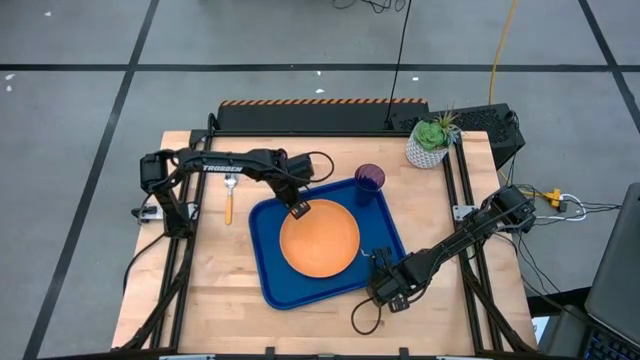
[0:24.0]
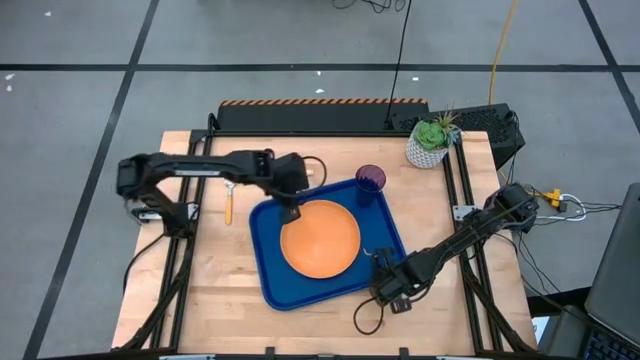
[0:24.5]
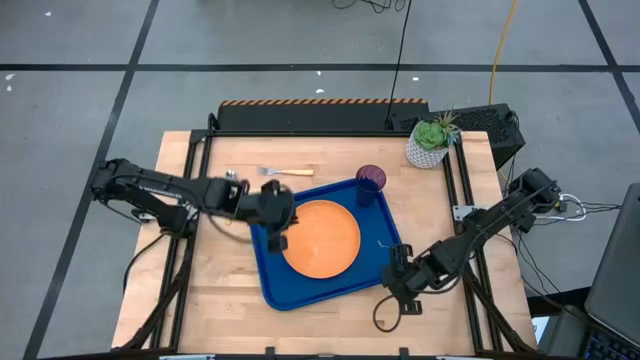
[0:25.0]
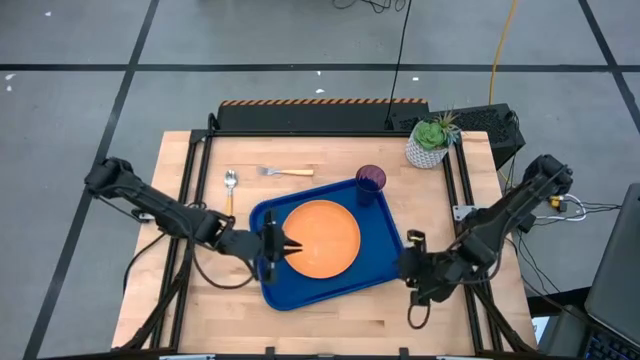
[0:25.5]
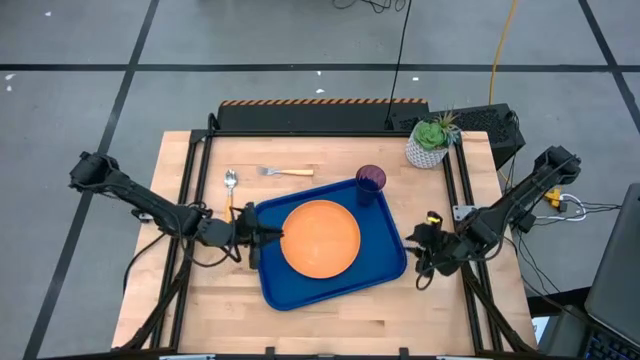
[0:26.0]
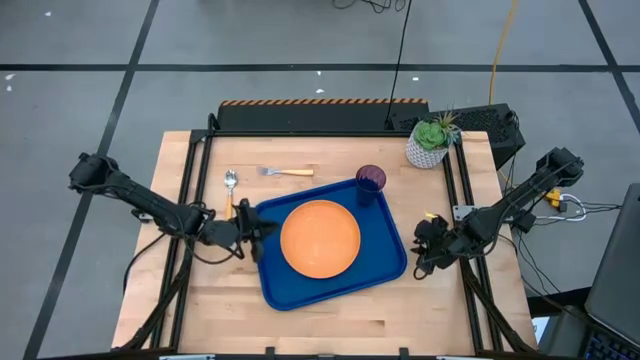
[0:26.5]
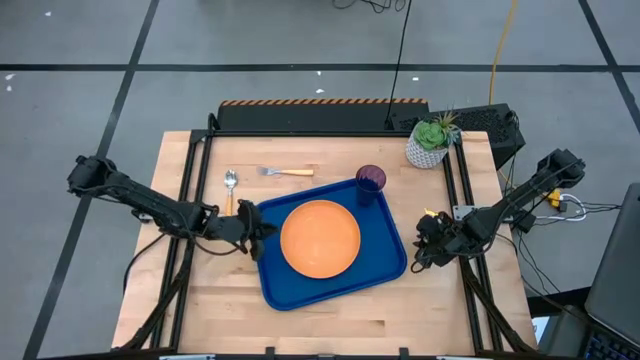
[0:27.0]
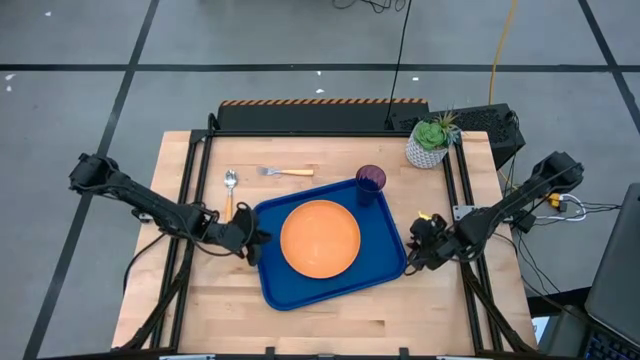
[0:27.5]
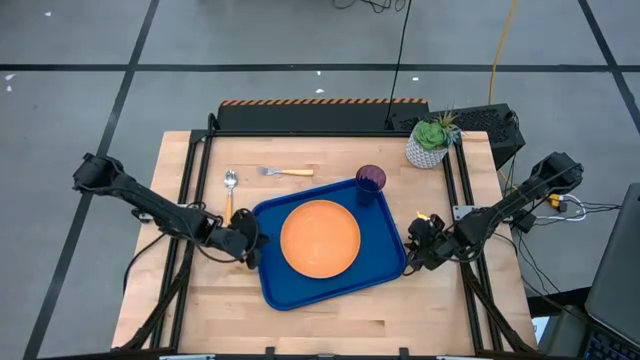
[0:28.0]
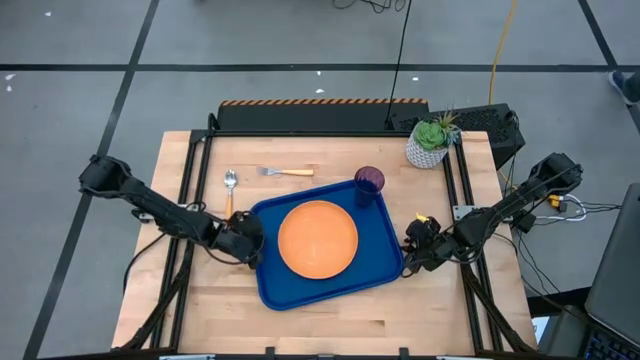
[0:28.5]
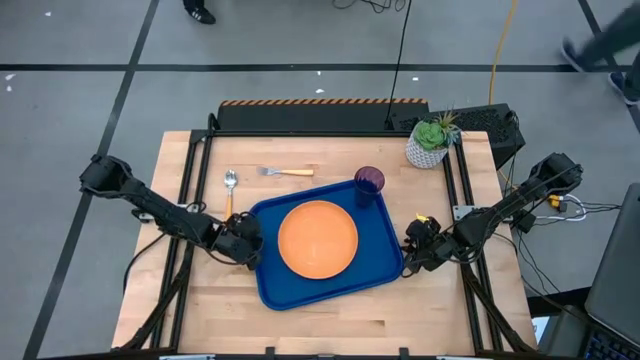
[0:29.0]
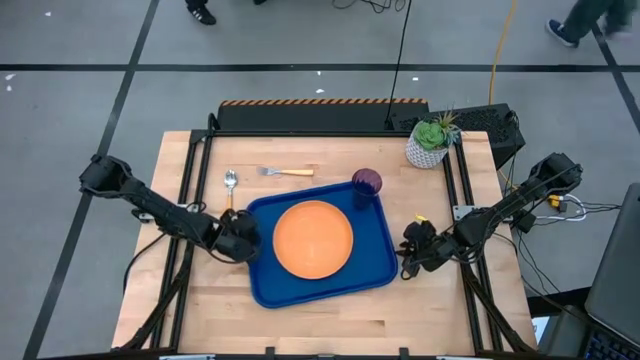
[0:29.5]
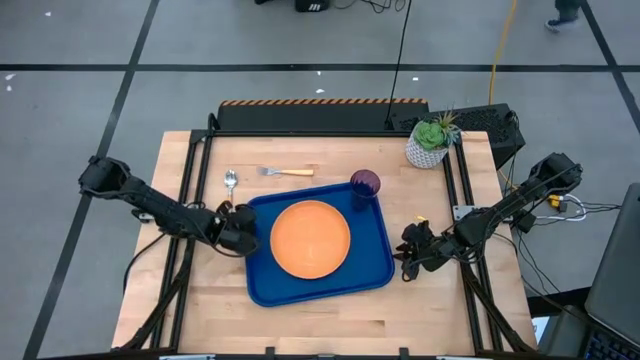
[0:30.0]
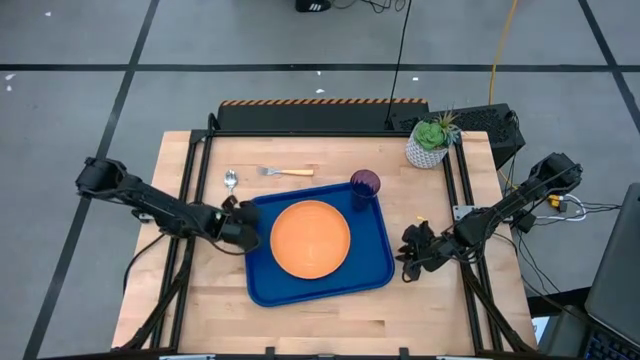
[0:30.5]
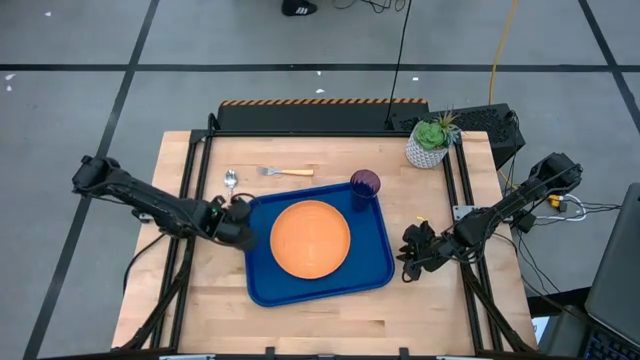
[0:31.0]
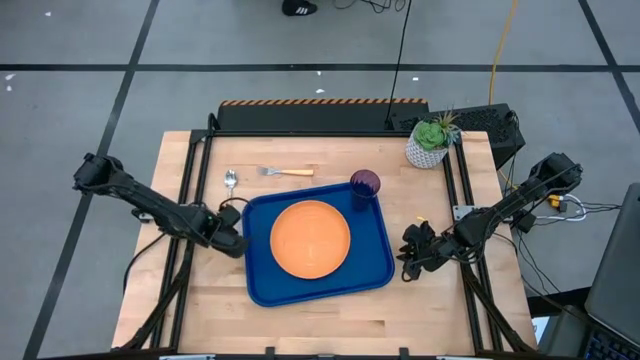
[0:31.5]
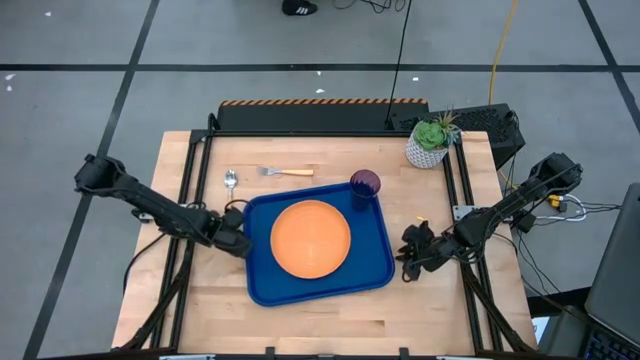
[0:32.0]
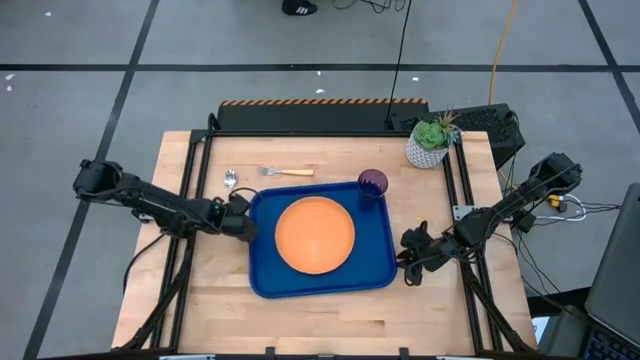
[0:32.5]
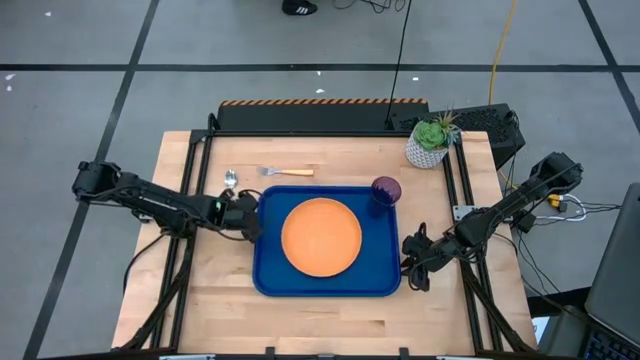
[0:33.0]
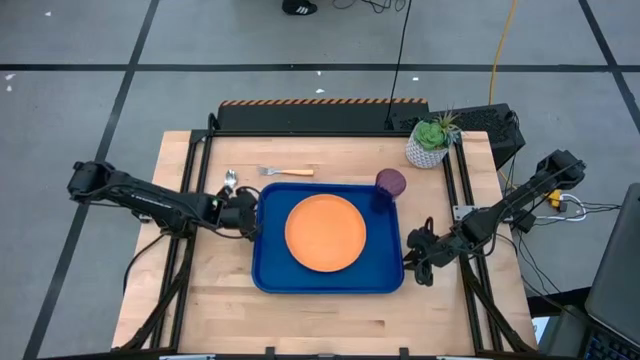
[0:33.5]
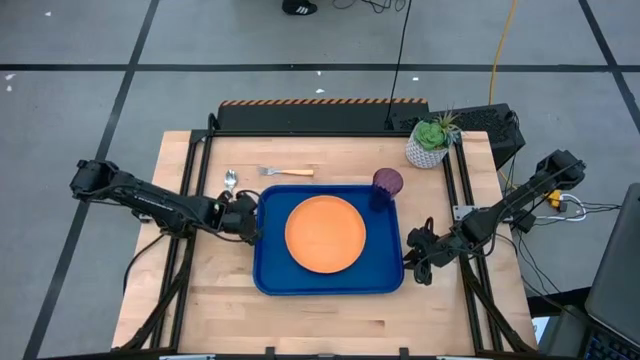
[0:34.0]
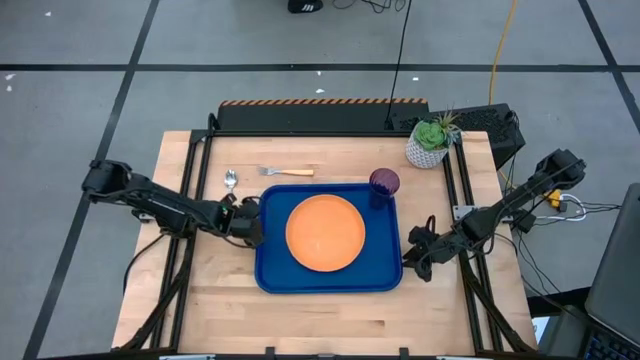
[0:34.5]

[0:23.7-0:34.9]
Task: Pick and place plate/cup/fork/spoon on tray
Adjust the blue tray

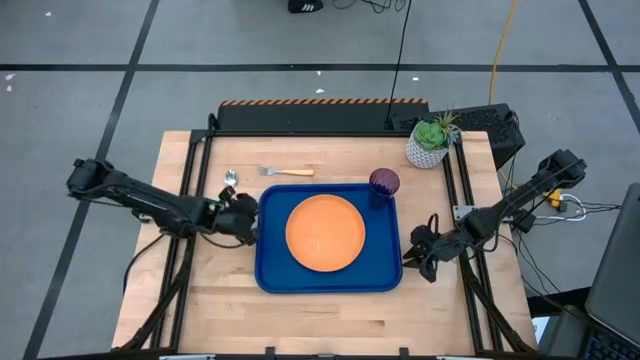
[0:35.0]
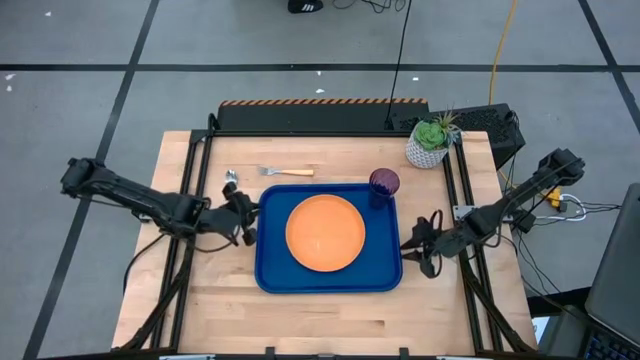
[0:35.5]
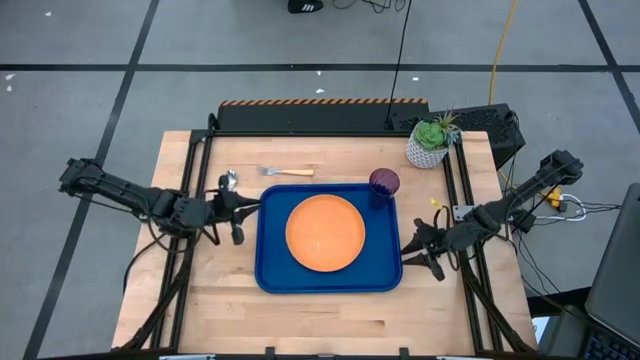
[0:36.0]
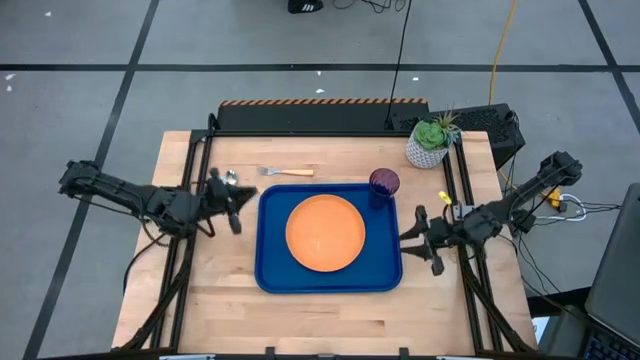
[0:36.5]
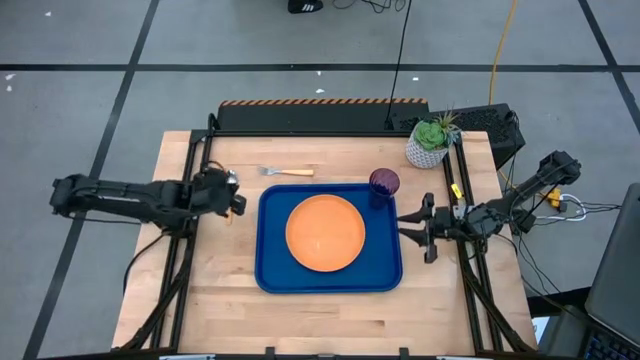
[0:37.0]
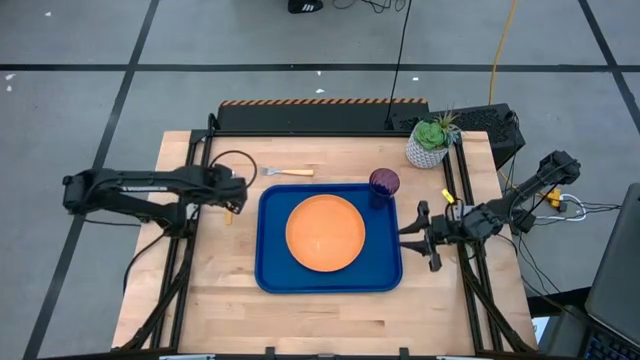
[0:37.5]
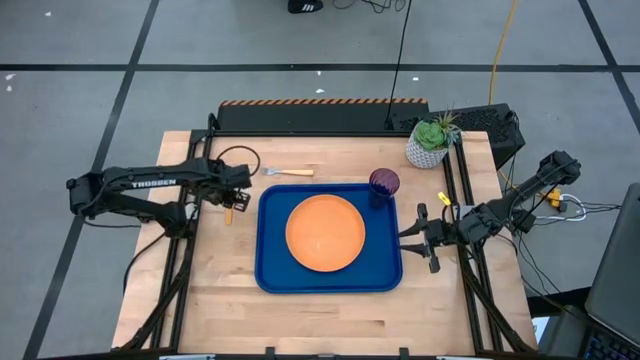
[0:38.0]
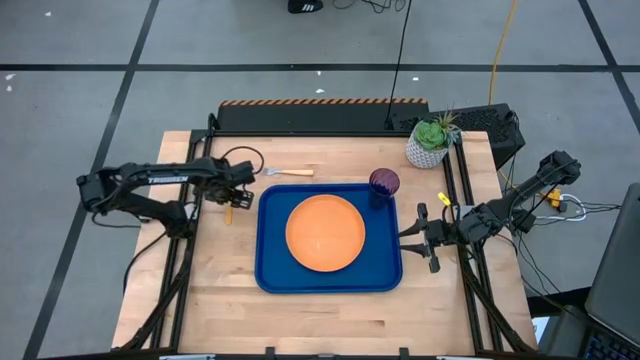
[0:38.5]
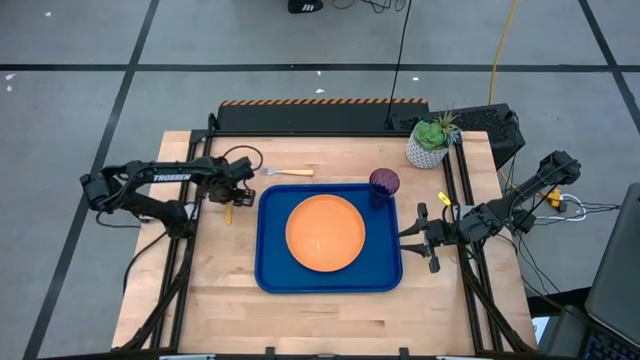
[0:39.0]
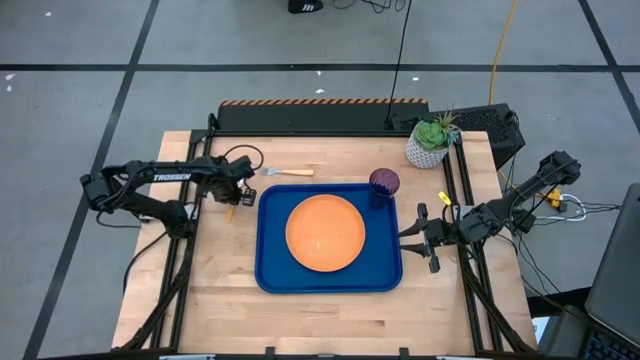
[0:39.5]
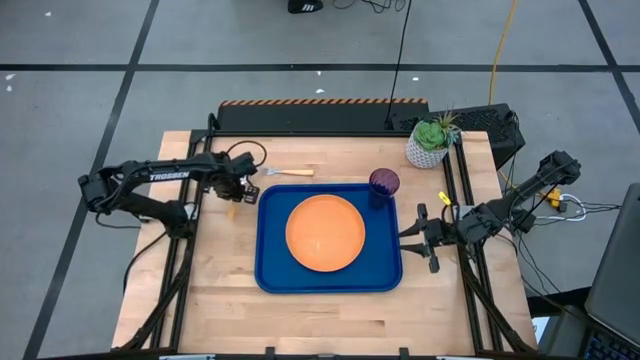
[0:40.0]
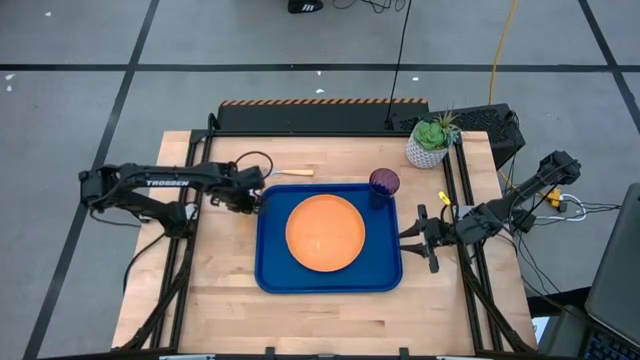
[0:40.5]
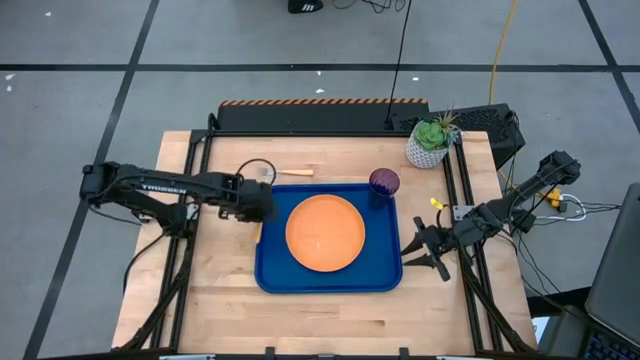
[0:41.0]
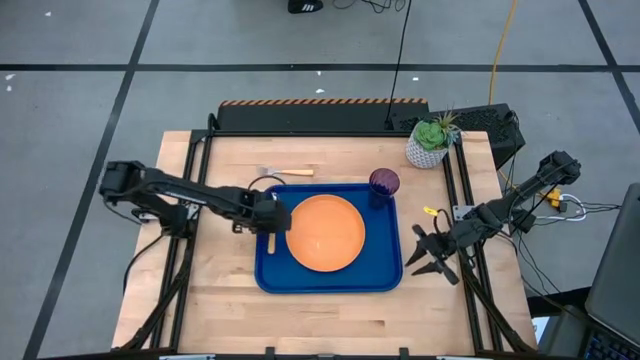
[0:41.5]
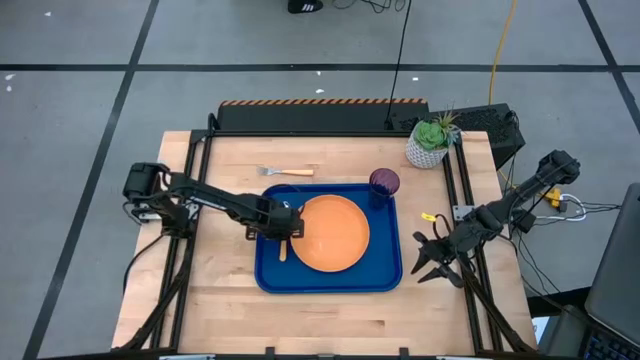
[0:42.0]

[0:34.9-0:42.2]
Put the orange spoon to the left of the orange plate on the blue tray

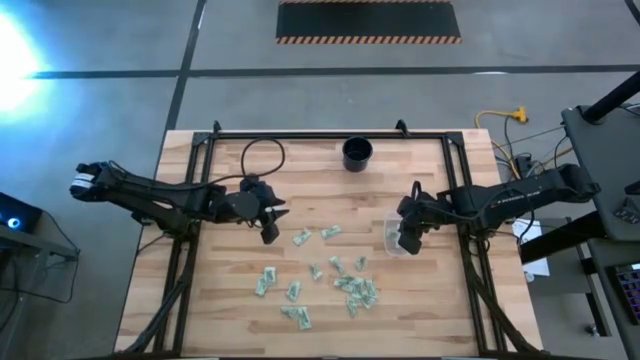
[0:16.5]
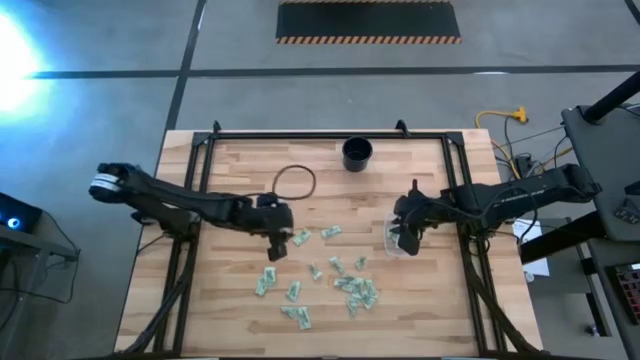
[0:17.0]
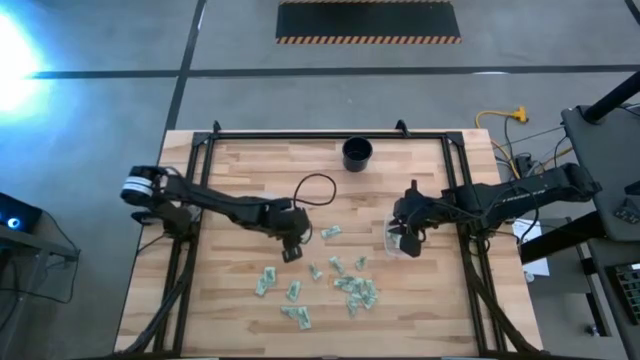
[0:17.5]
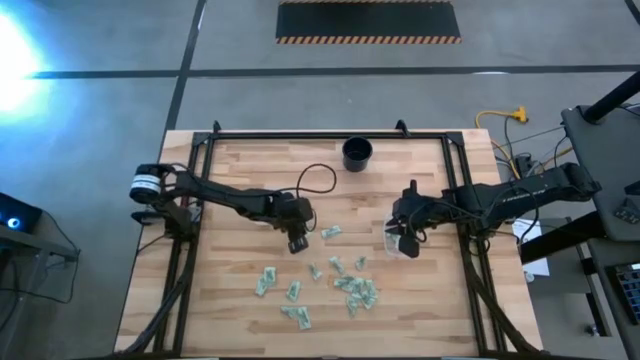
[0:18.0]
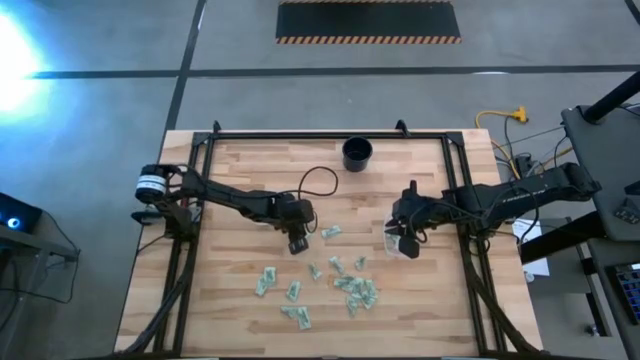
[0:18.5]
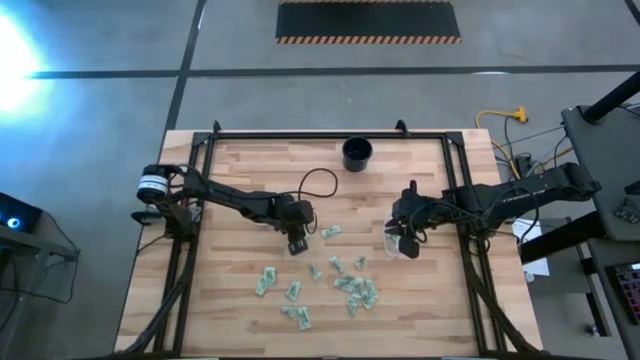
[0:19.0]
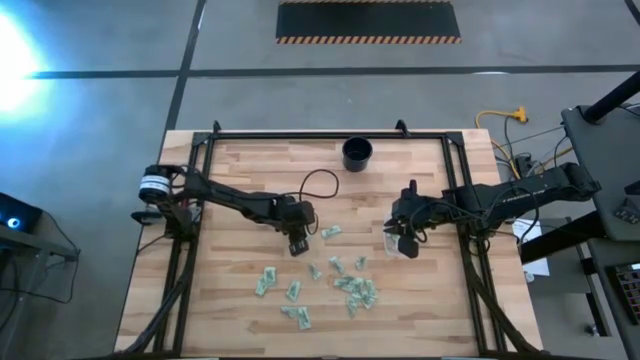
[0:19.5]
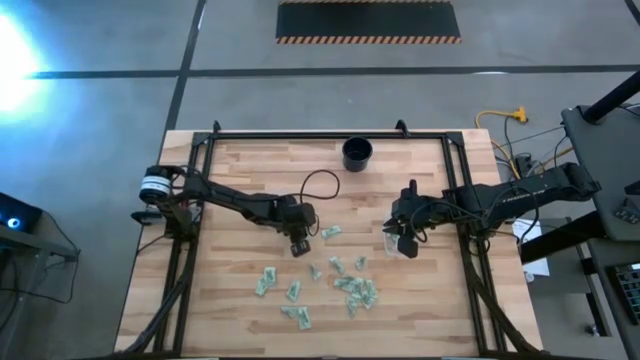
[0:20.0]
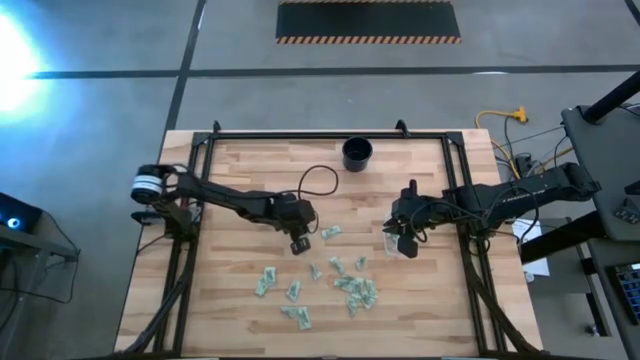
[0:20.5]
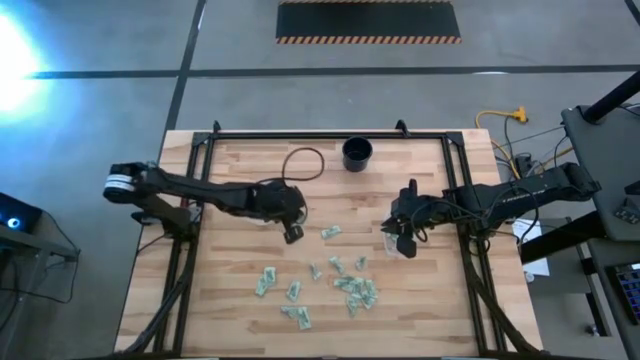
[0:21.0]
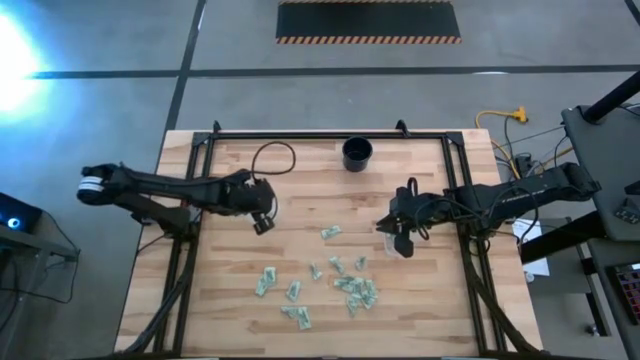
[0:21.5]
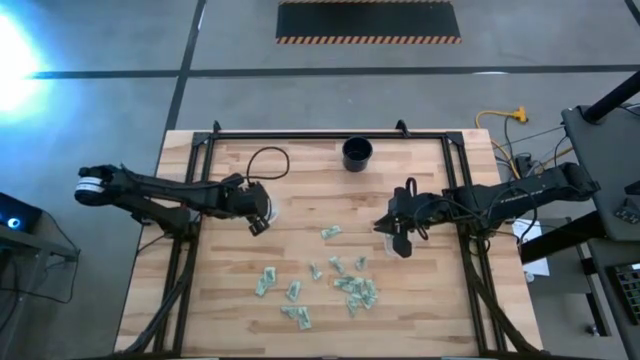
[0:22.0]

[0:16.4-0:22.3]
Task: Pick and place items into bin
Put the white sweetener packet into the left transparent bin
